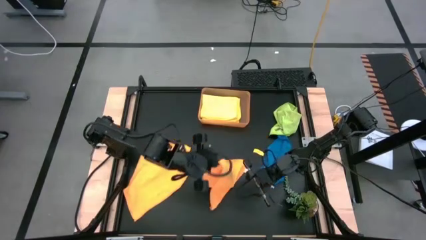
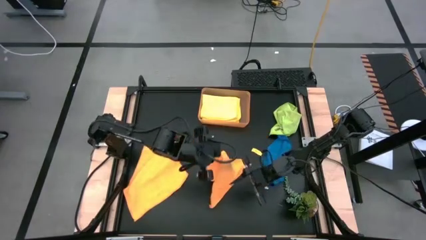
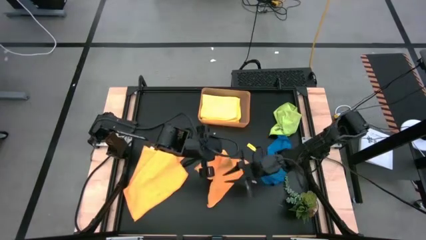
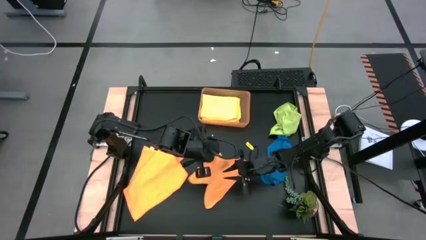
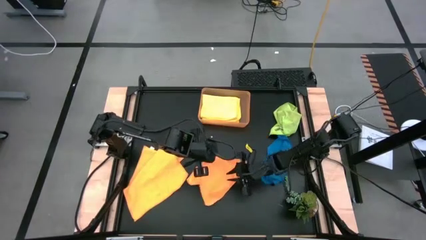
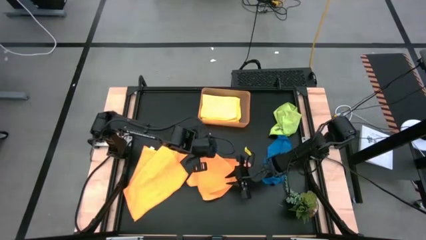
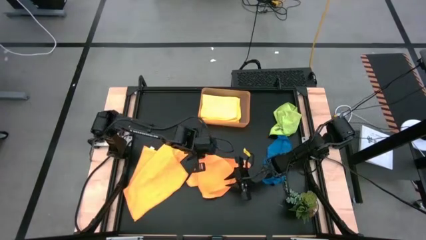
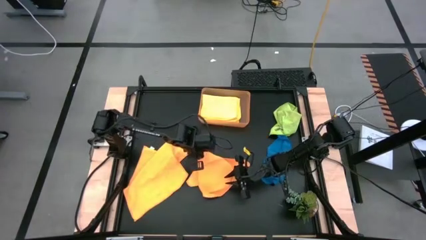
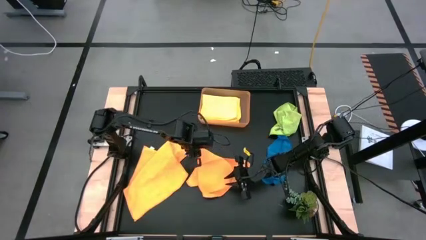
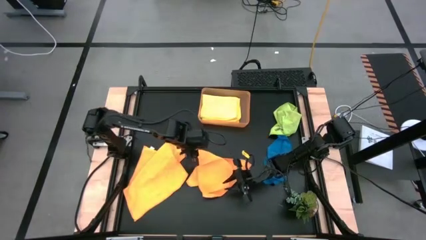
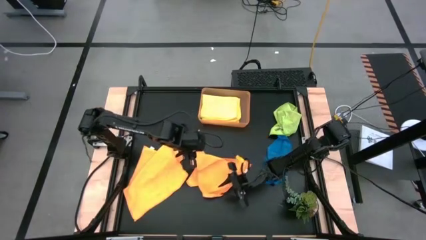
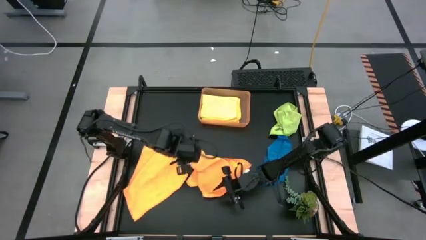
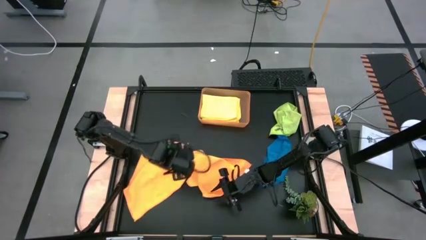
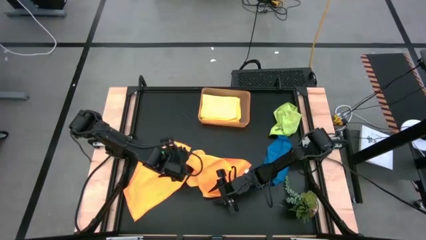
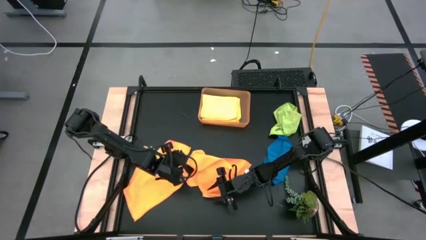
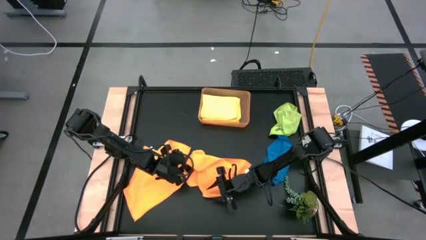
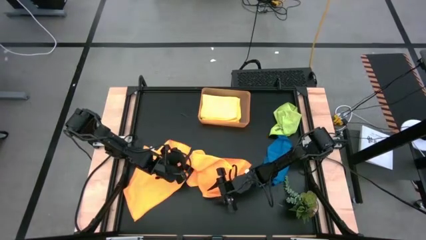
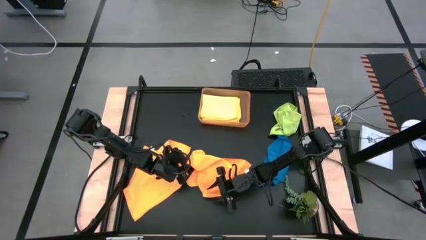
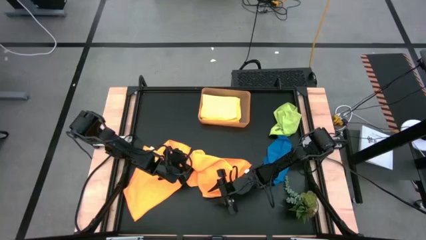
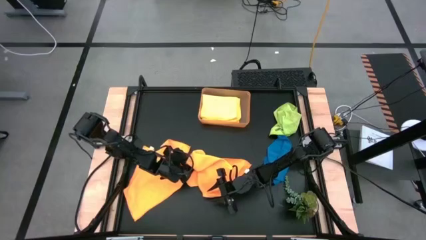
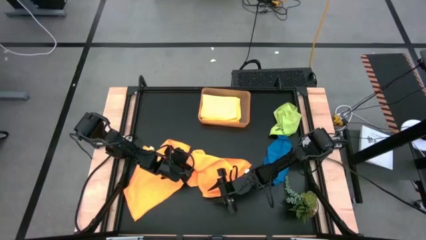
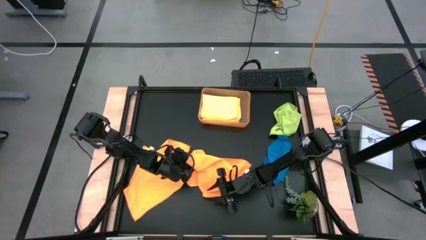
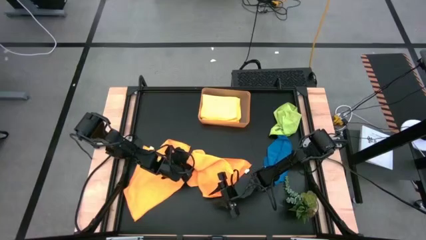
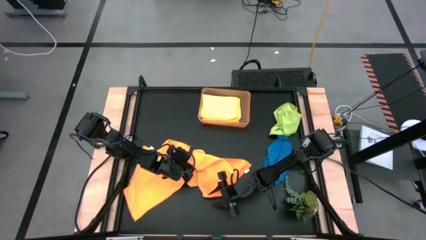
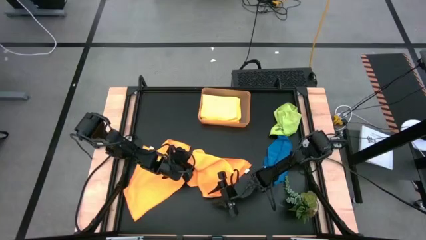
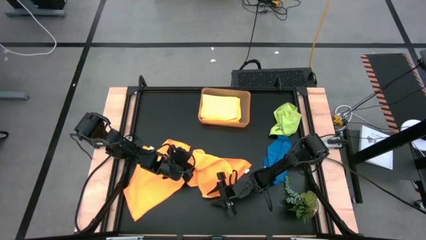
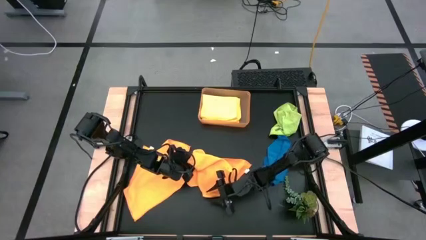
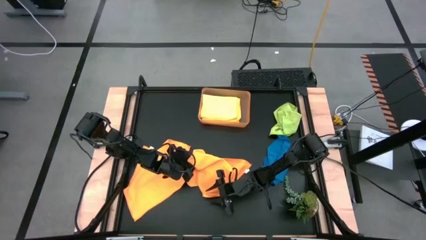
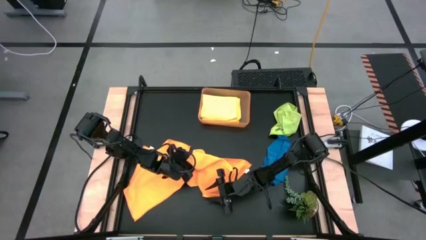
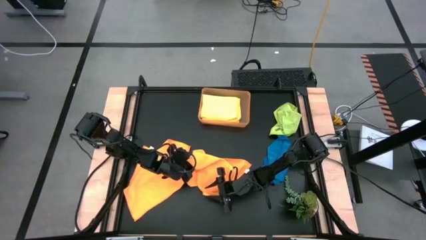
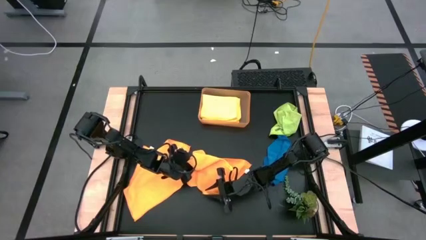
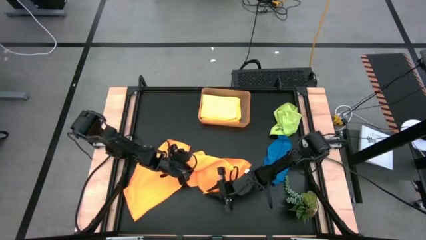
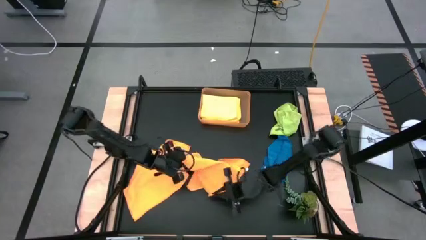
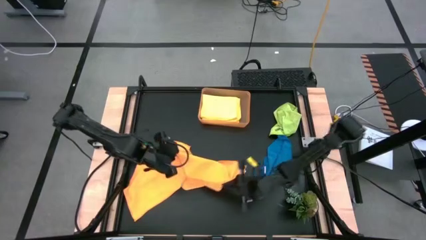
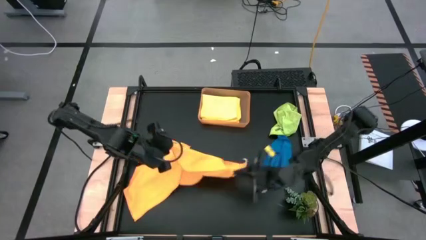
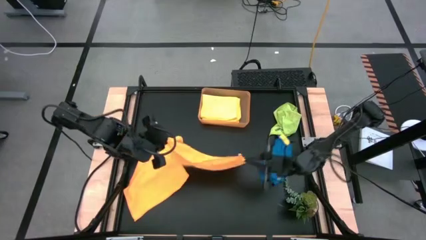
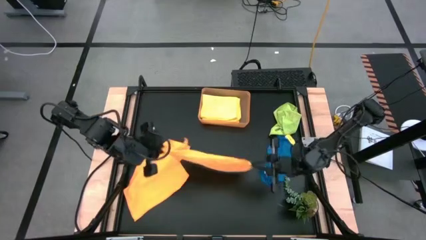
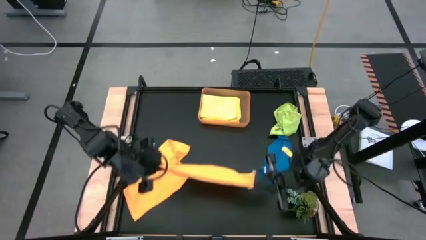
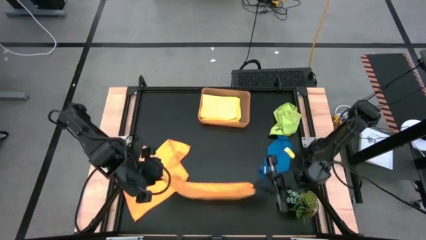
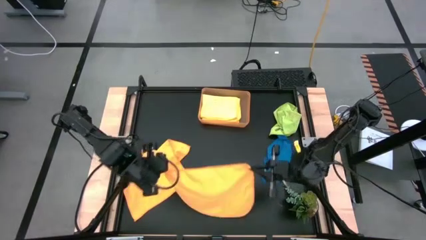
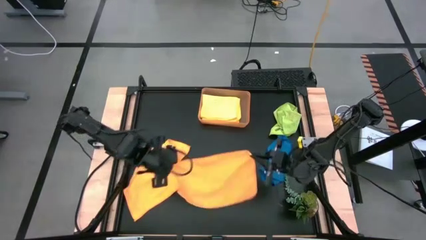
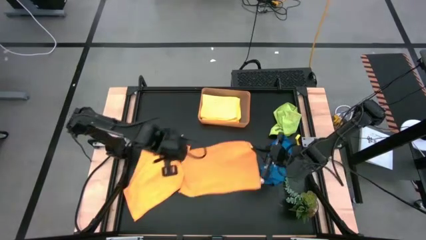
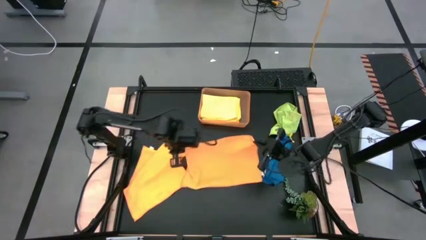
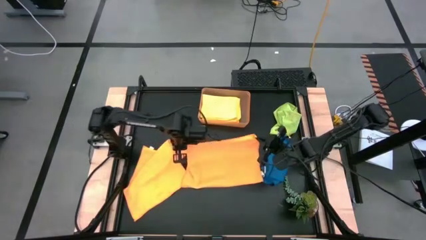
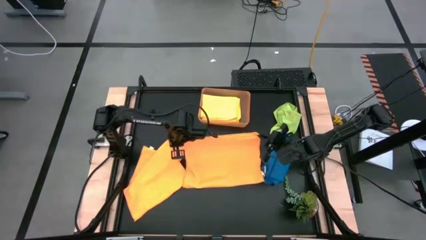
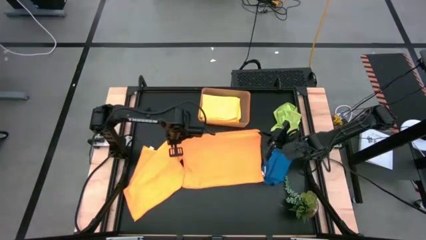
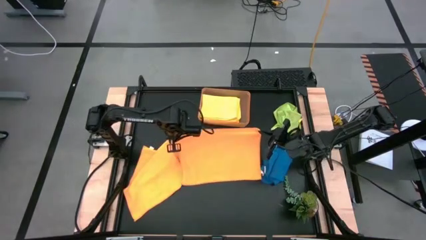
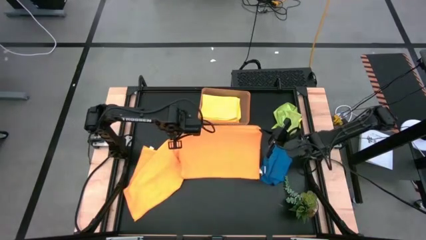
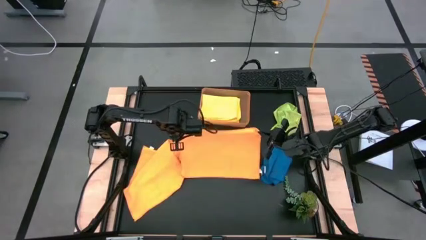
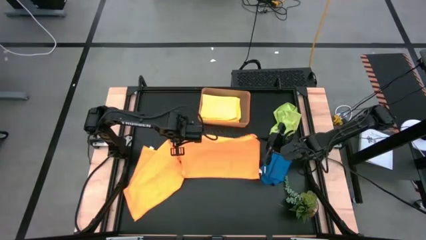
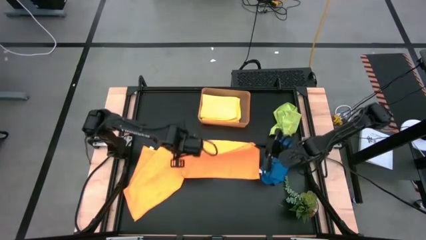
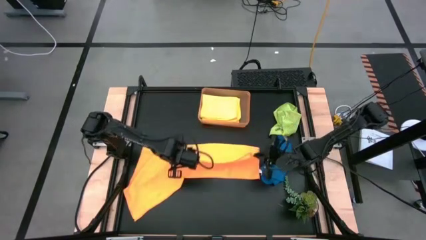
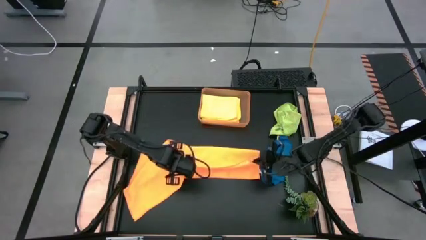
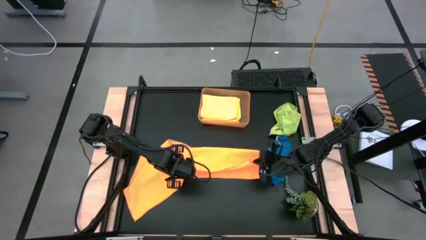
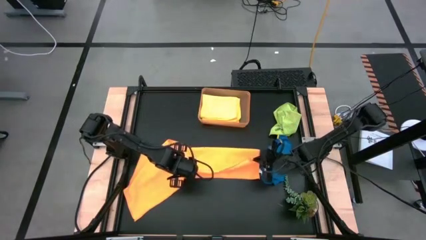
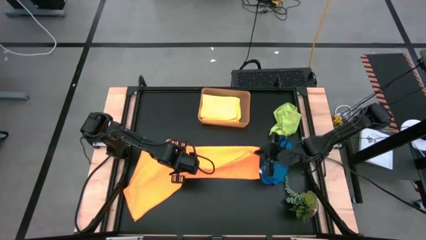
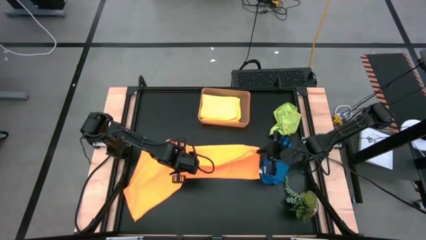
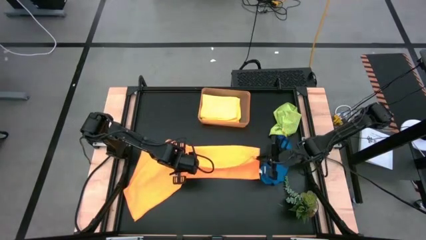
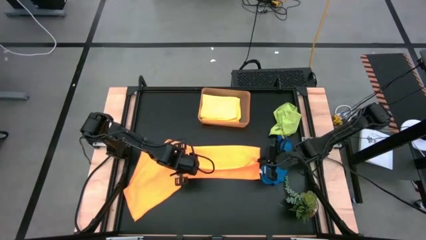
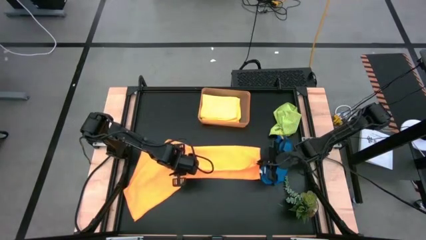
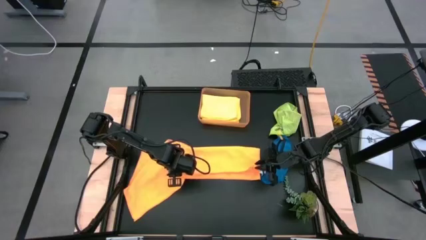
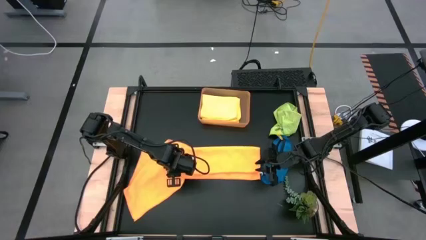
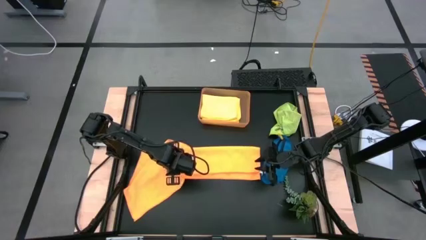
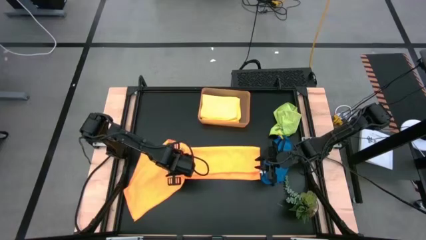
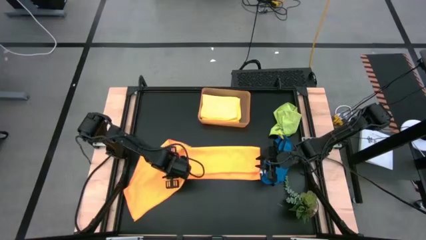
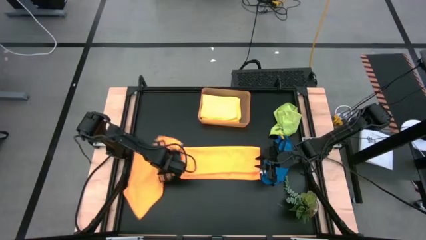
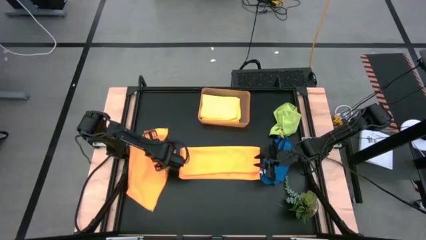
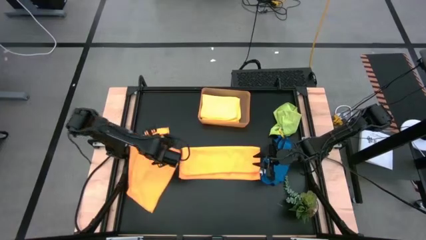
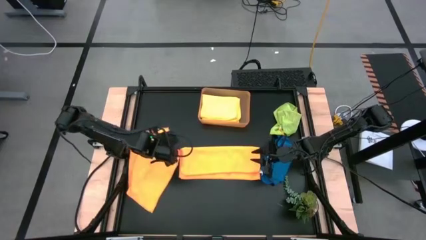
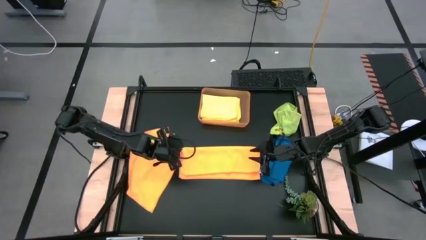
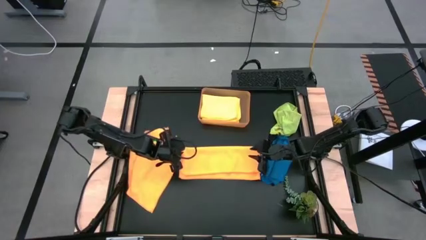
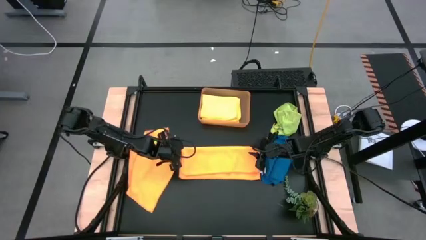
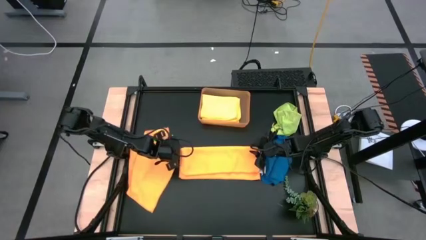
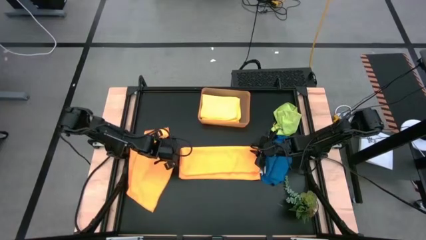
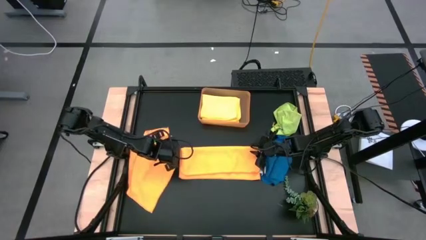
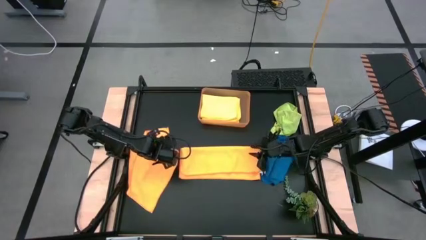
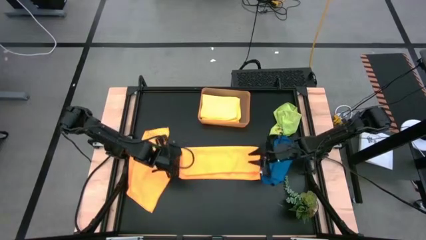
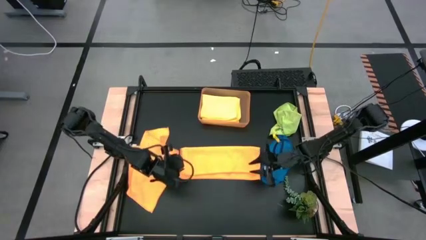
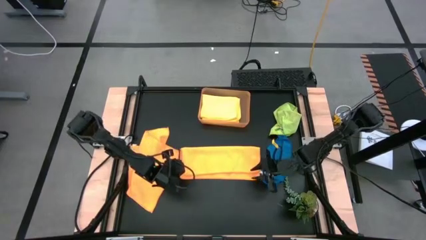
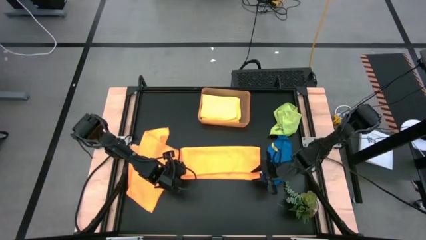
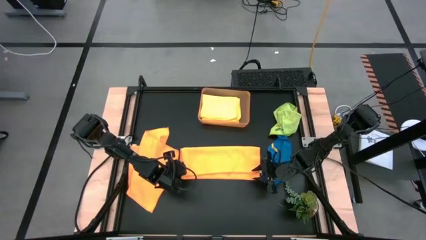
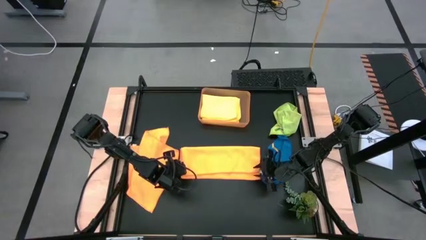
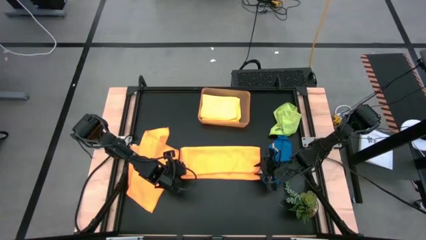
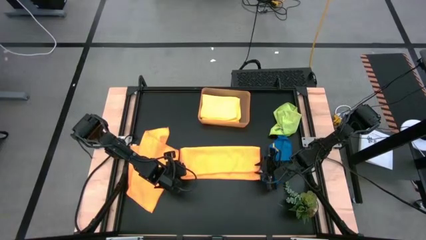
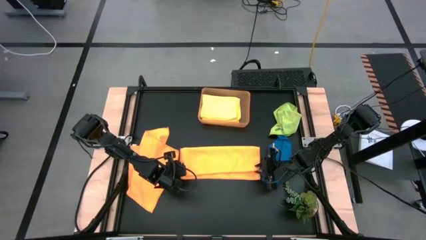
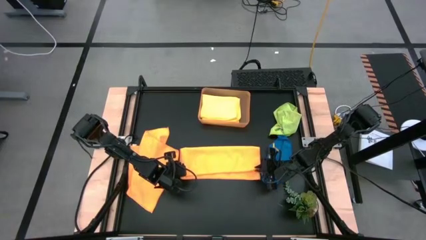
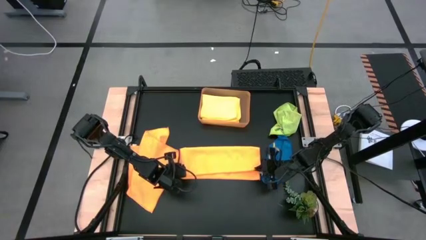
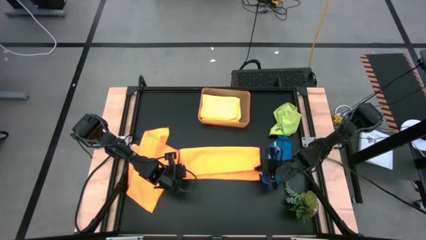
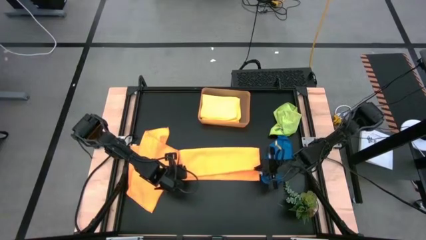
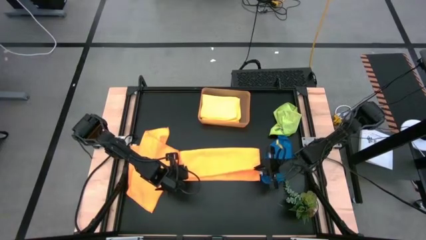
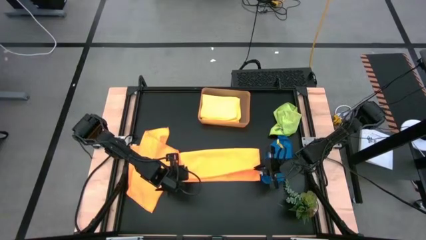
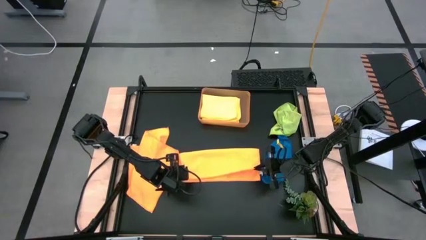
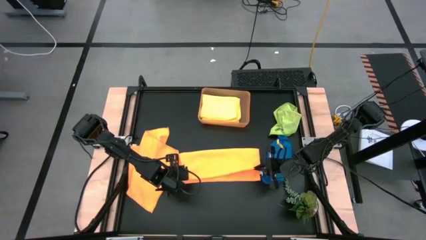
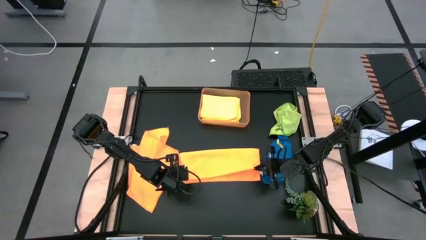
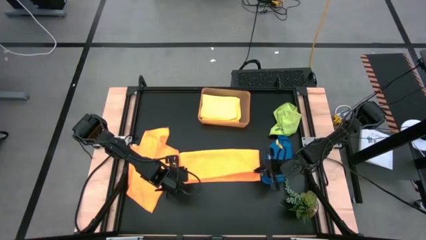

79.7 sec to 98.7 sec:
Task: Fold microfiber towels
Fold the right orange towel
